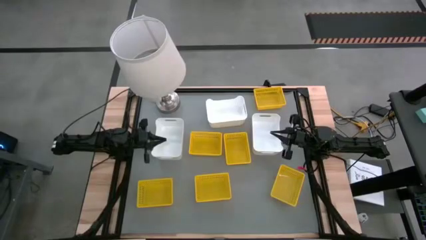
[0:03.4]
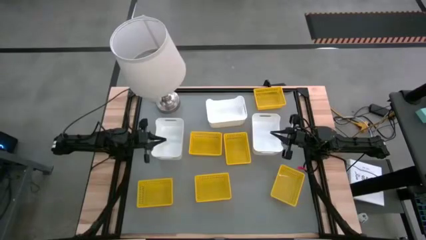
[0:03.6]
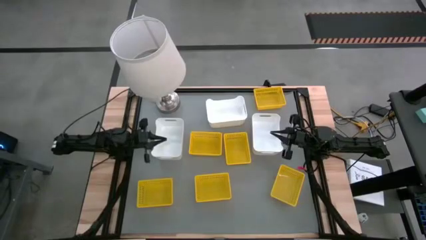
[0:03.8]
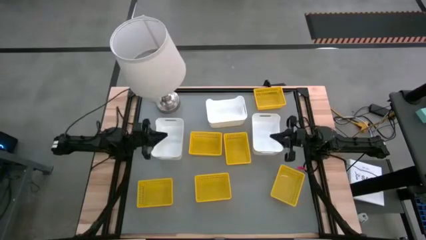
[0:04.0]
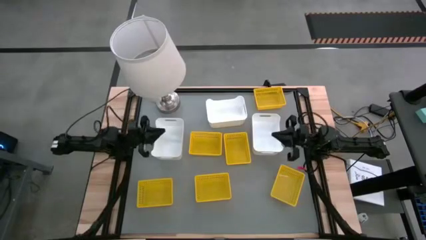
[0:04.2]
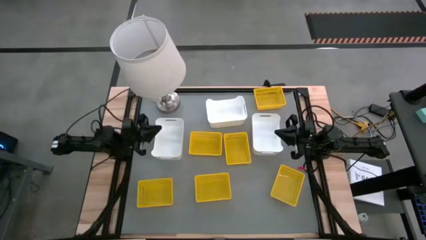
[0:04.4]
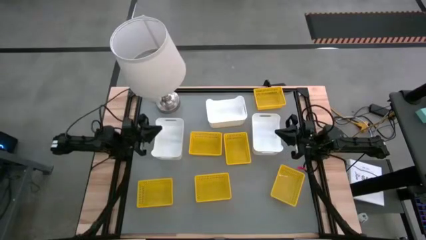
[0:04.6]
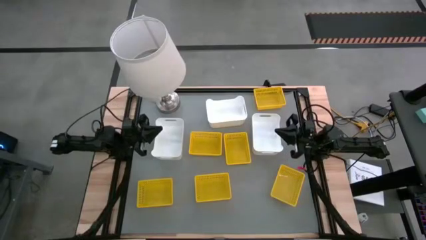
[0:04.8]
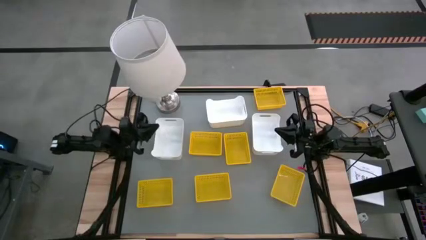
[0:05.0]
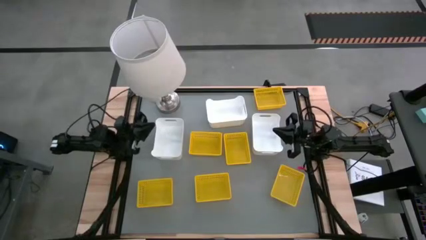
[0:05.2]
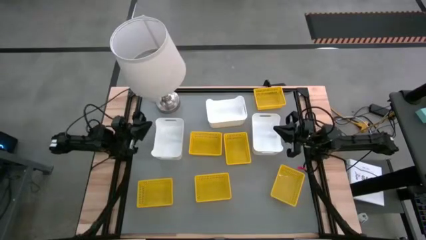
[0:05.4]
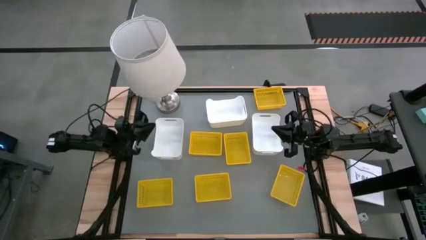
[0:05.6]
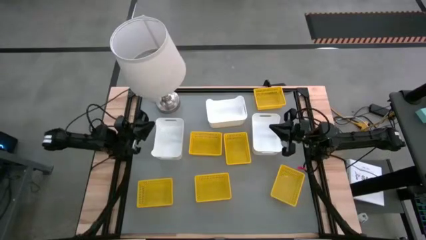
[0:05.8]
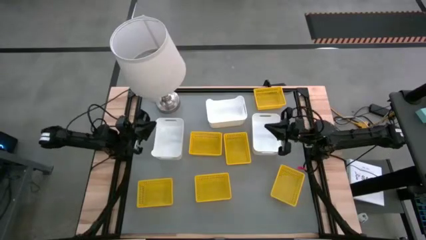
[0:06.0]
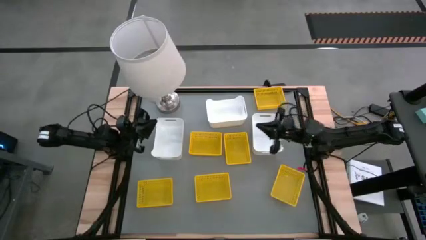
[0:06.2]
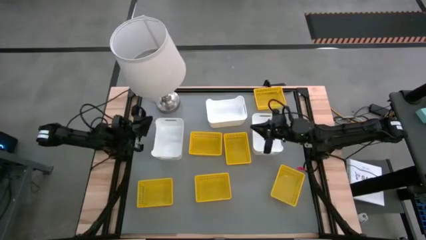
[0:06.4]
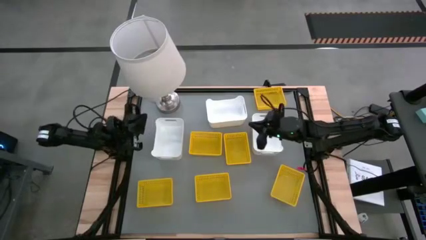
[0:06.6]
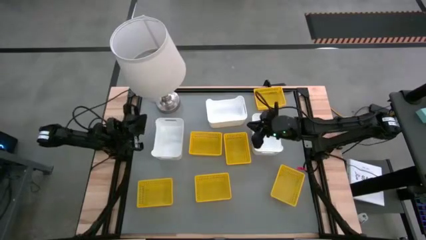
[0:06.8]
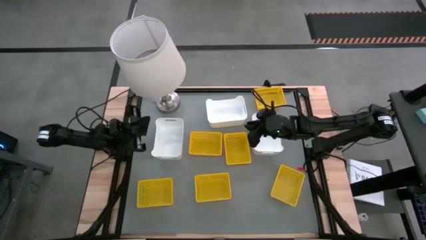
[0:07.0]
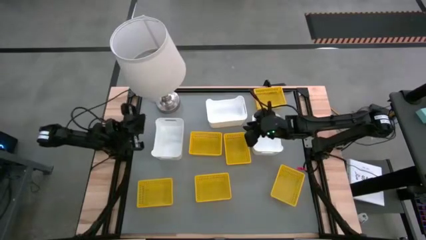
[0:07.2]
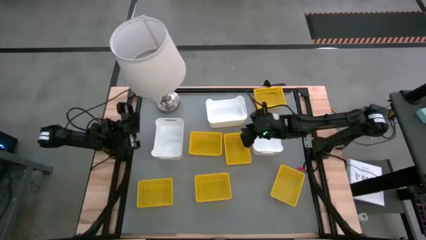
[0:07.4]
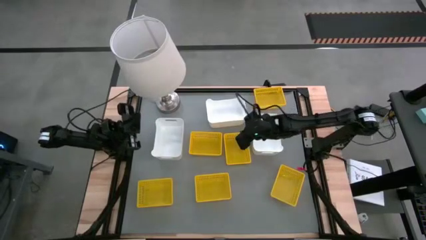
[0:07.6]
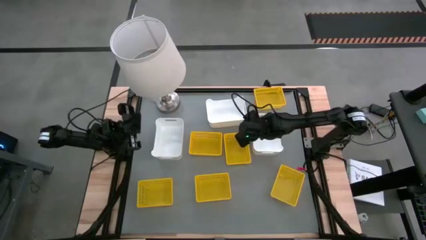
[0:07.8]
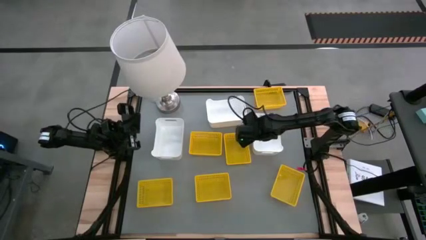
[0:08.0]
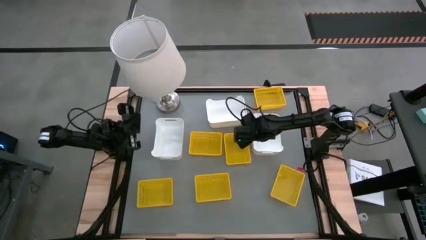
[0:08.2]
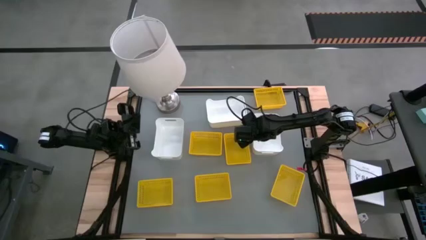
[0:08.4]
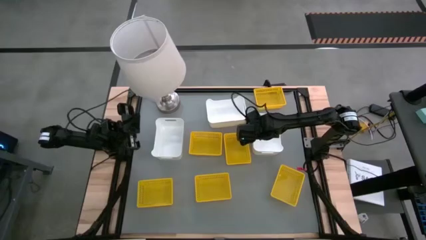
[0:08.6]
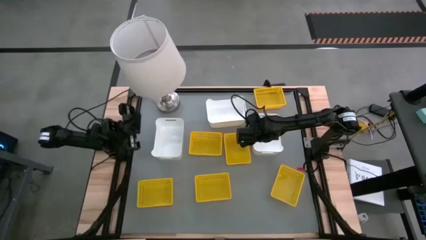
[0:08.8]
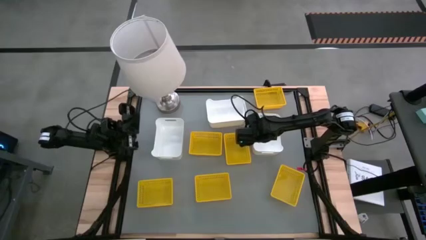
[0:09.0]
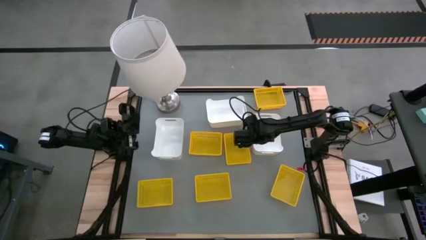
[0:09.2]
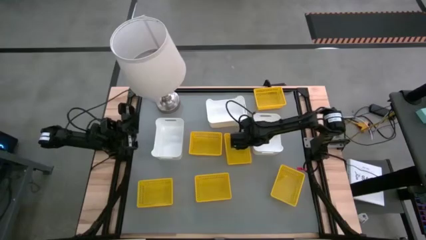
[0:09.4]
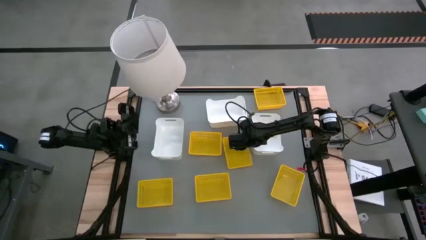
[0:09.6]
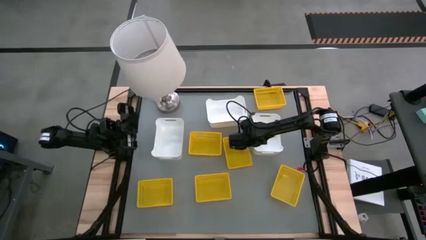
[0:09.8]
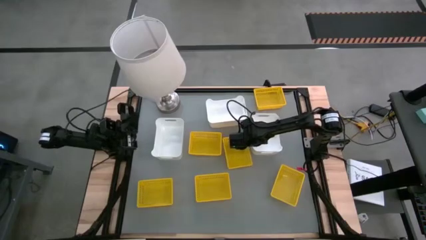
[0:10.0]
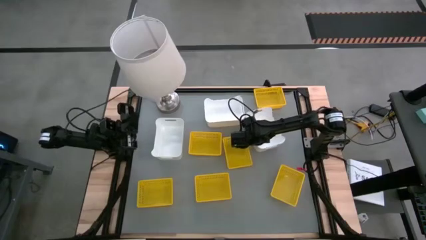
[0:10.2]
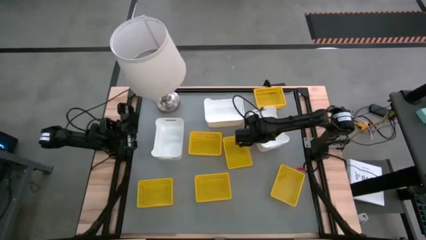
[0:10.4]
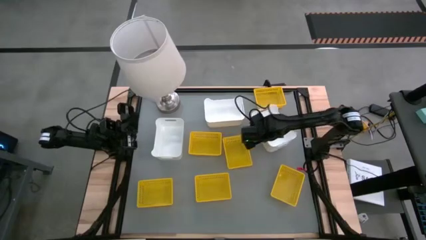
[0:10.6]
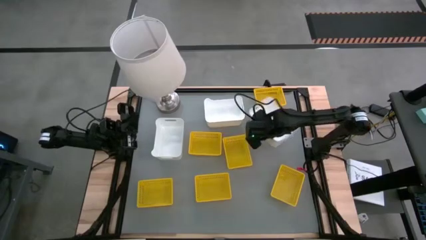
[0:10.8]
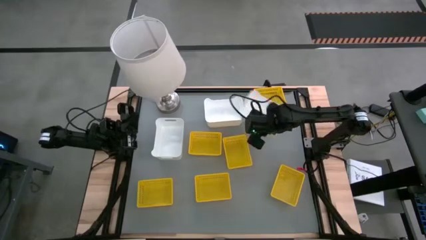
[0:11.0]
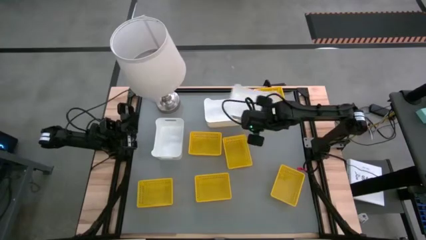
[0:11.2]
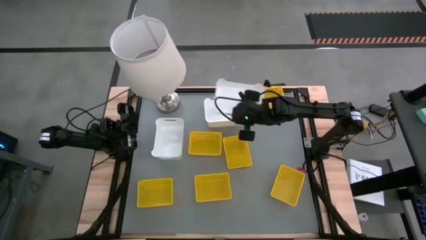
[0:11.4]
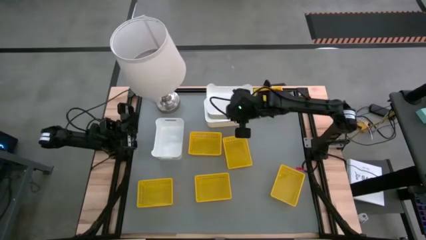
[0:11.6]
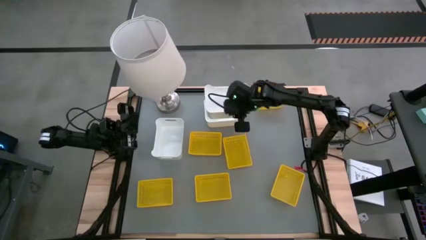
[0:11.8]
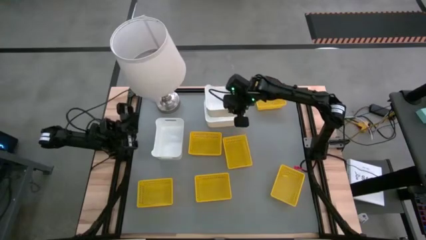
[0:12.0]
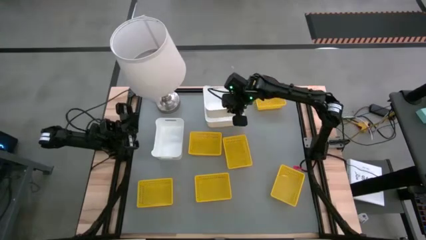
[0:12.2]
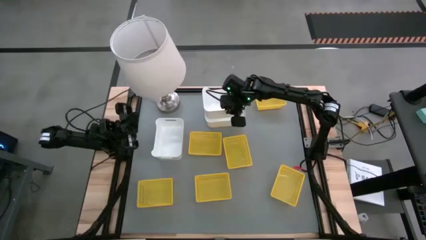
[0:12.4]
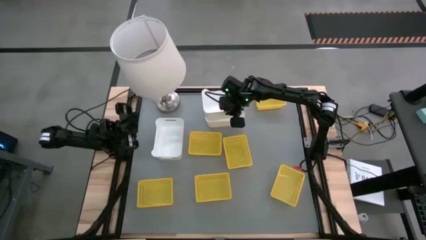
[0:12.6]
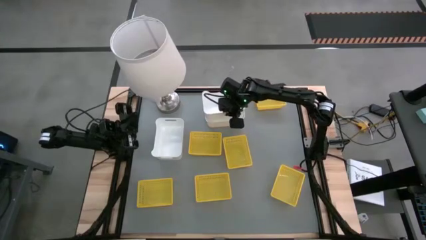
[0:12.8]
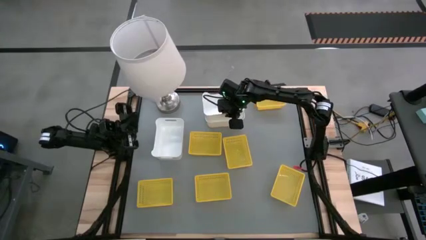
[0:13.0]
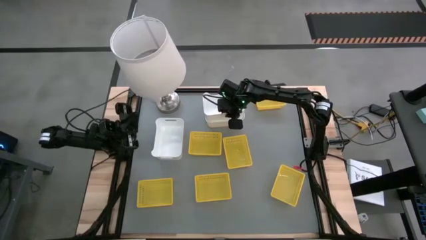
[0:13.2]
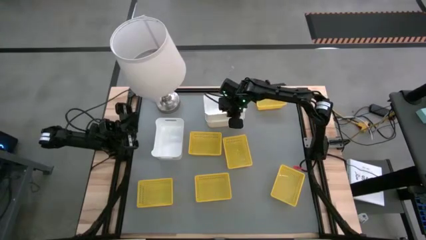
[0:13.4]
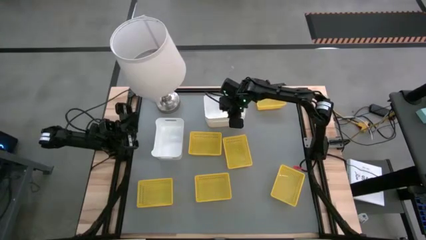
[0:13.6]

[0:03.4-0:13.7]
Stack the white bin on the other white bin

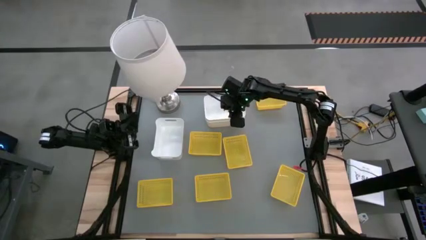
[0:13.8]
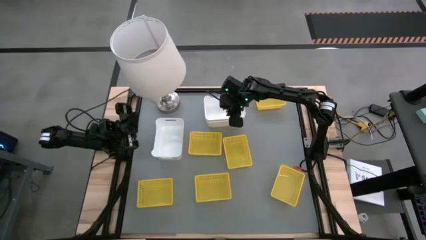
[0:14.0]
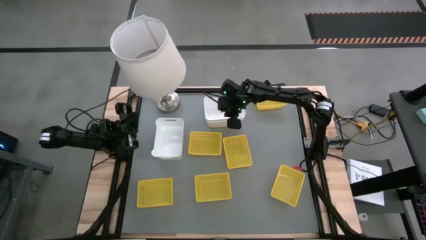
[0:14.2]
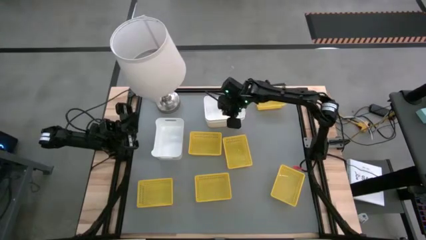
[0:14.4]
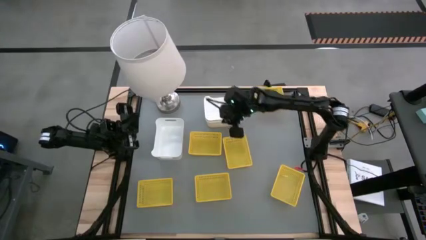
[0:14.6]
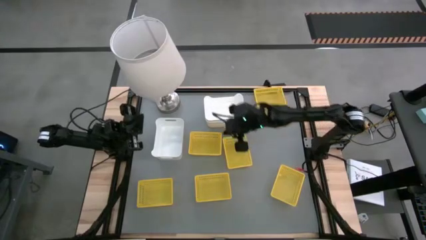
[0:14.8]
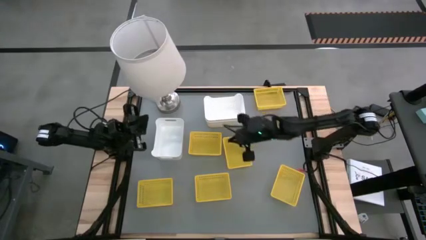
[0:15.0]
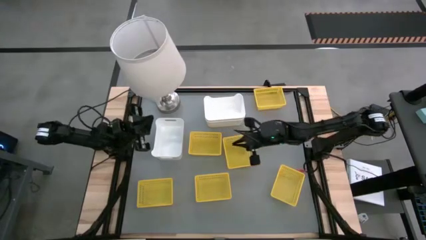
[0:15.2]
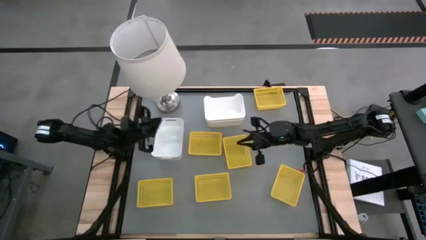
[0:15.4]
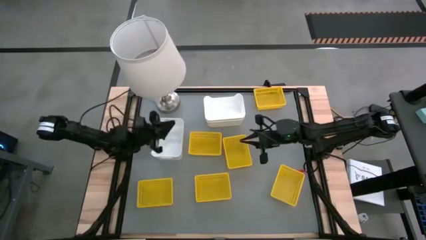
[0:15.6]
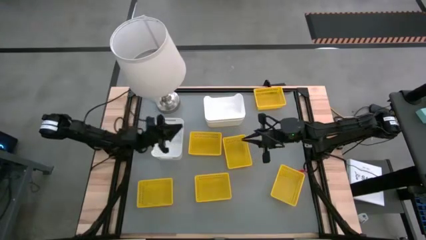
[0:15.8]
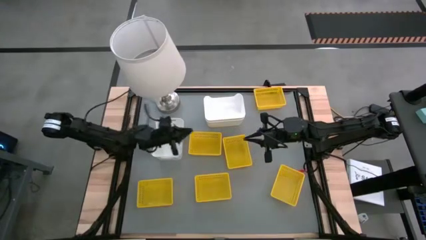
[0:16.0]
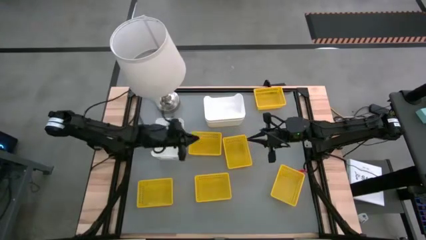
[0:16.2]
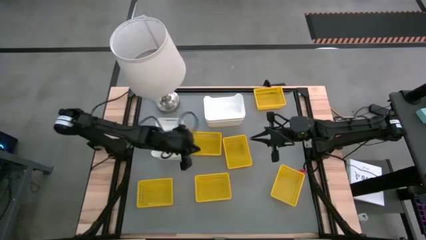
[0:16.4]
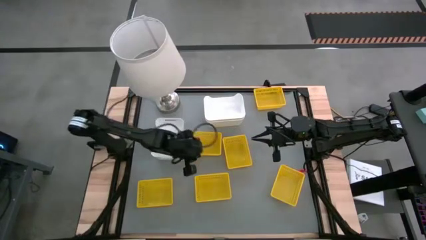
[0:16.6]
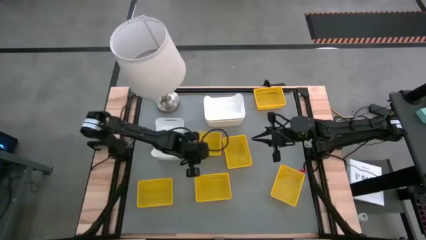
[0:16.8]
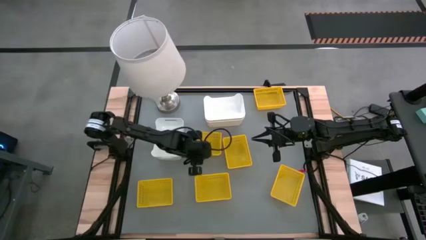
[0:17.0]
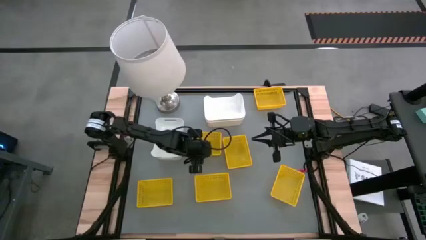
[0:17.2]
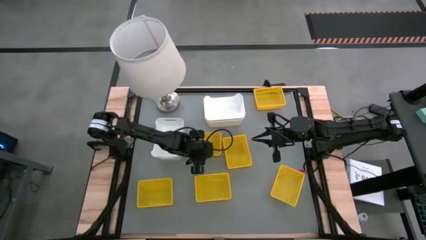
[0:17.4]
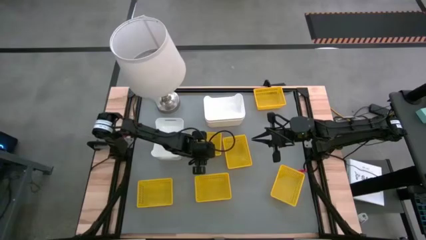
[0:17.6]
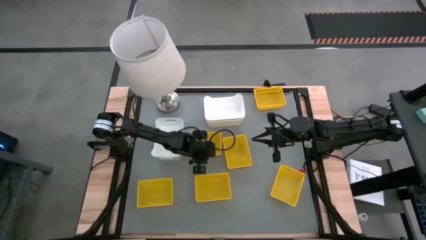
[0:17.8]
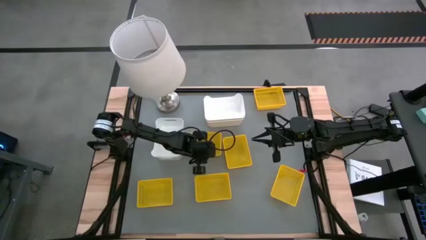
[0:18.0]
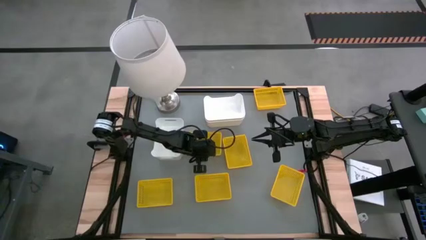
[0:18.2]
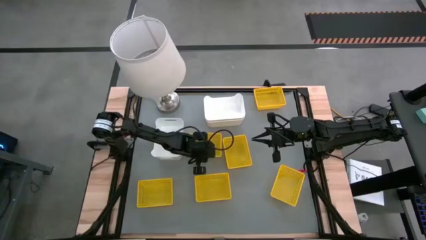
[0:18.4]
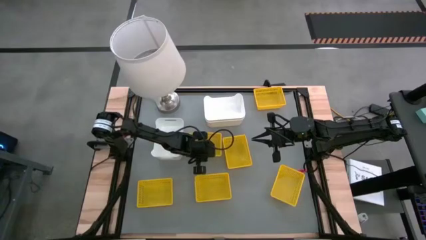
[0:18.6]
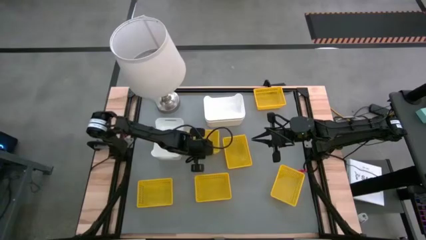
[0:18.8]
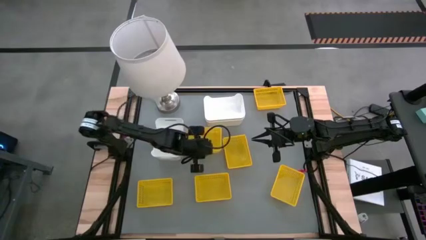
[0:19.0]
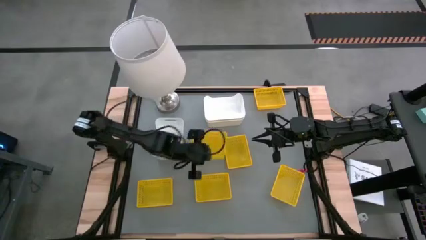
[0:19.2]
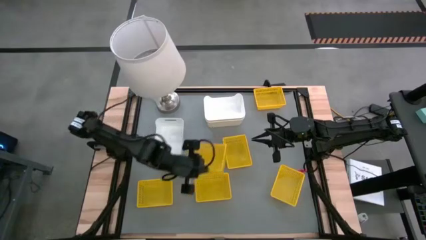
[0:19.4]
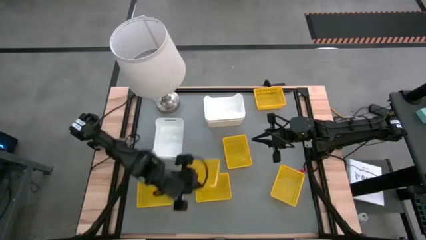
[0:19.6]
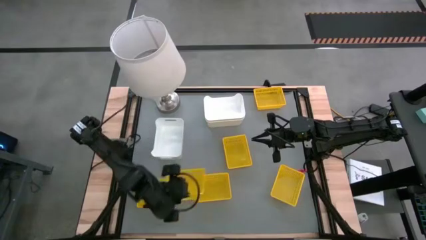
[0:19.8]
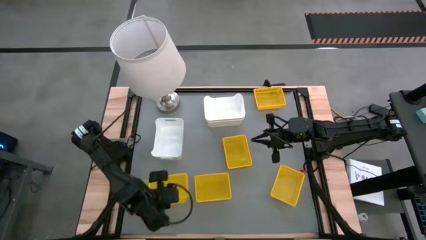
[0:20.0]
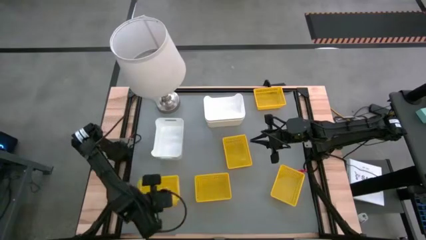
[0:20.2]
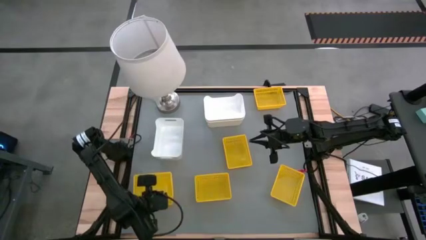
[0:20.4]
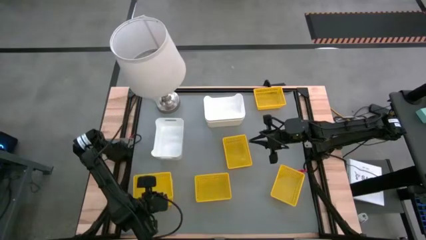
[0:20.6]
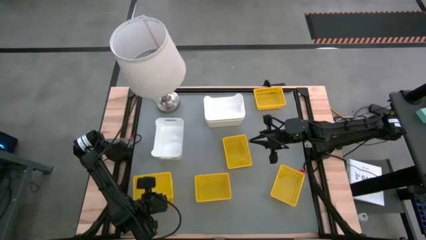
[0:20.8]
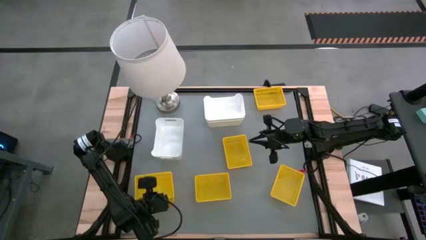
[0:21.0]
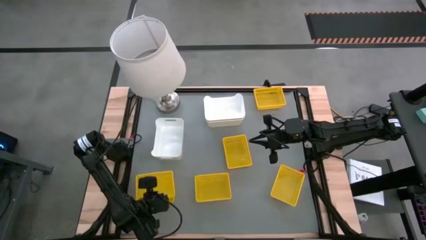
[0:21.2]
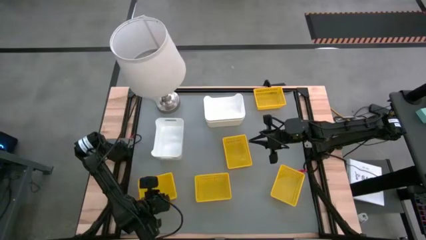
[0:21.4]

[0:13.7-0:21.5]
Stack the yellow basket on the other yellow basket
